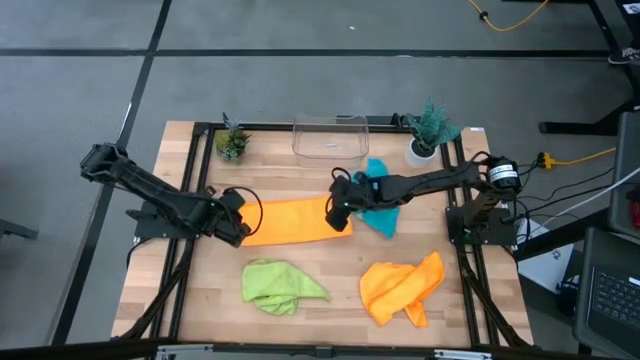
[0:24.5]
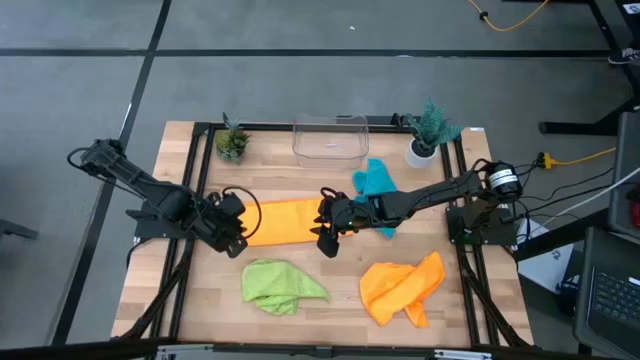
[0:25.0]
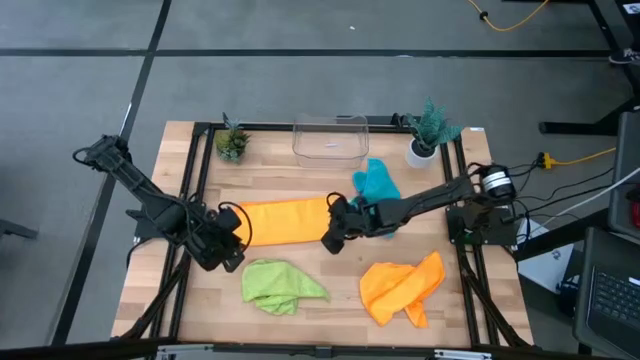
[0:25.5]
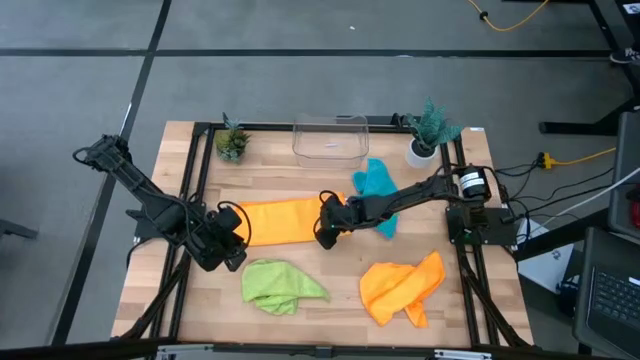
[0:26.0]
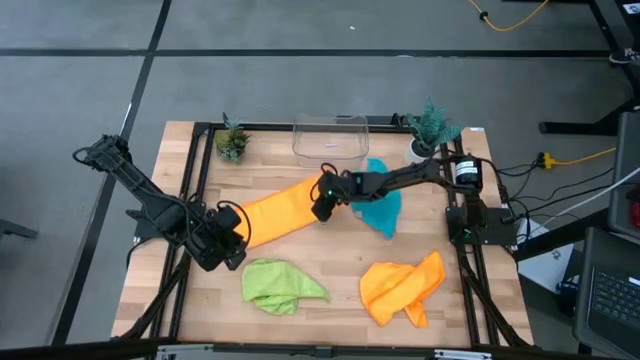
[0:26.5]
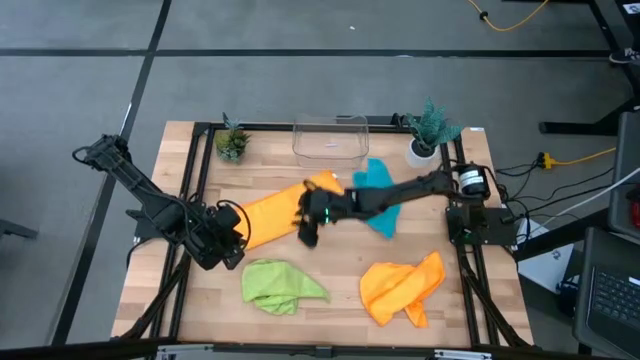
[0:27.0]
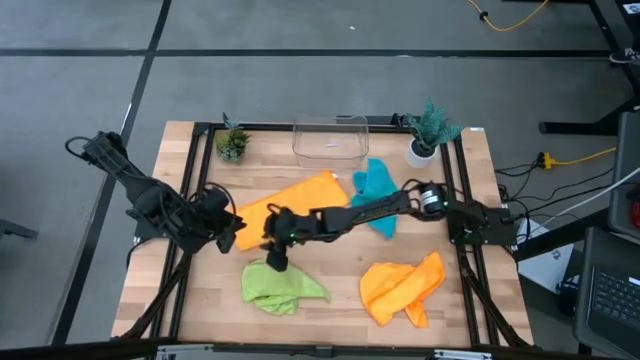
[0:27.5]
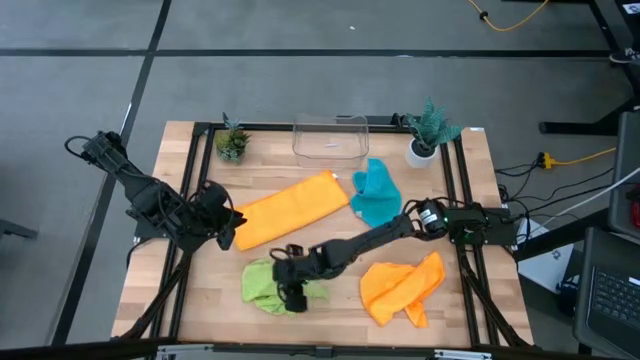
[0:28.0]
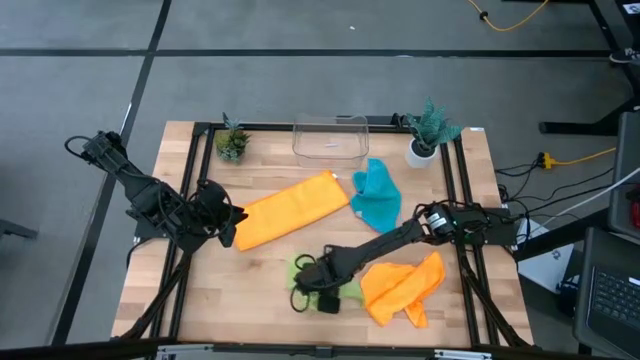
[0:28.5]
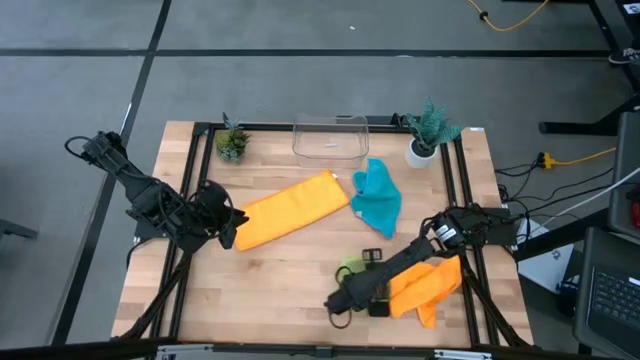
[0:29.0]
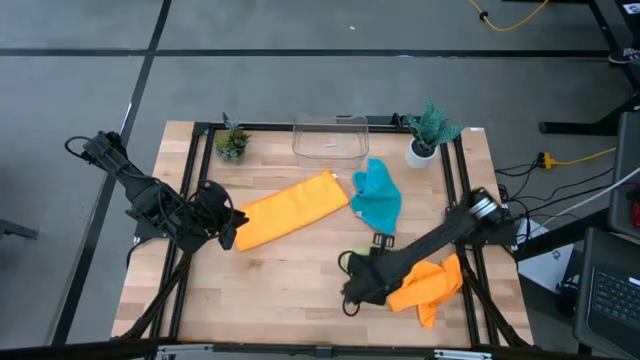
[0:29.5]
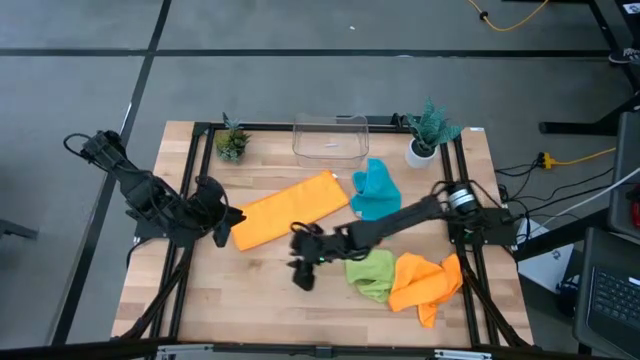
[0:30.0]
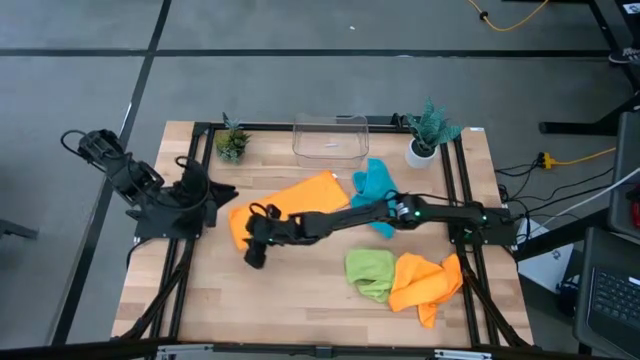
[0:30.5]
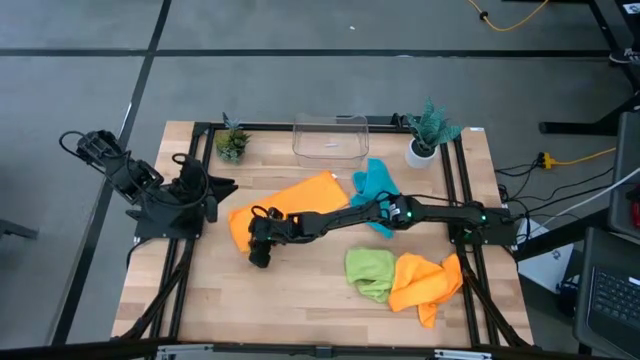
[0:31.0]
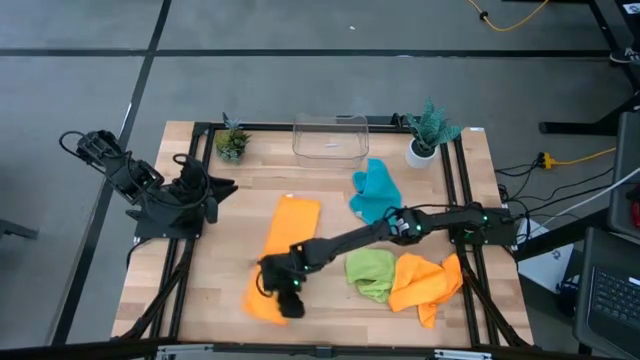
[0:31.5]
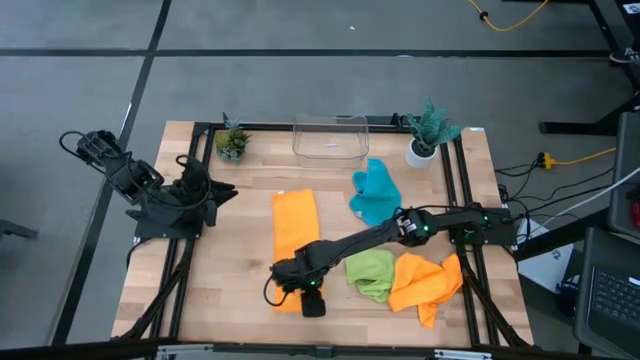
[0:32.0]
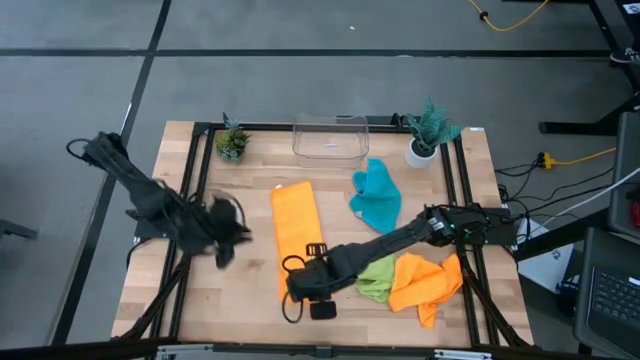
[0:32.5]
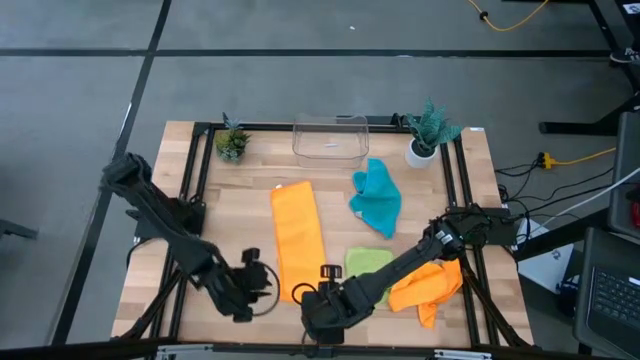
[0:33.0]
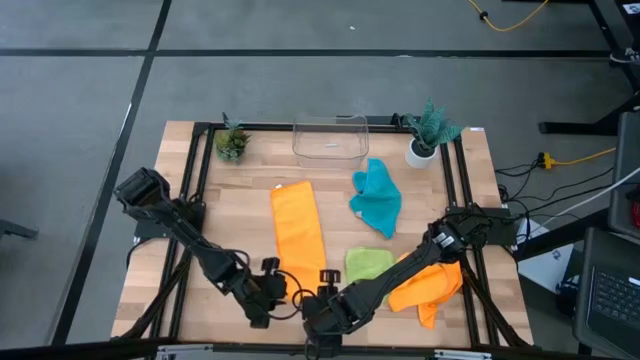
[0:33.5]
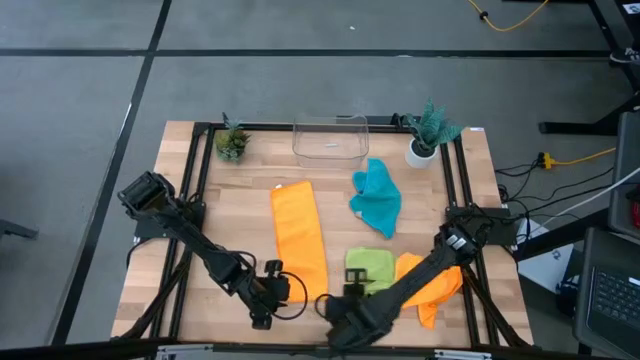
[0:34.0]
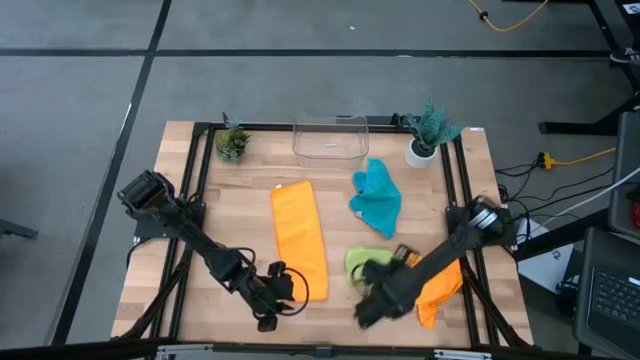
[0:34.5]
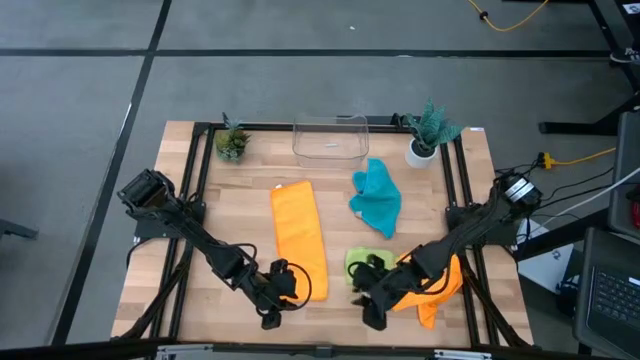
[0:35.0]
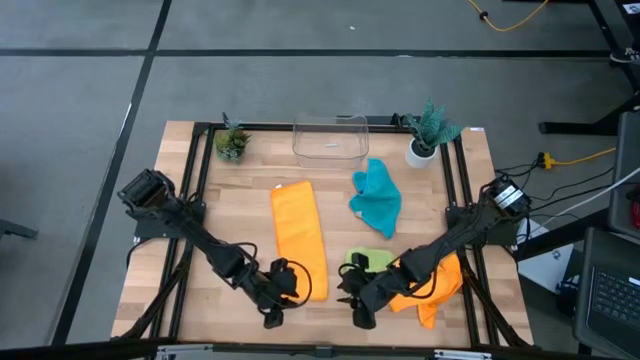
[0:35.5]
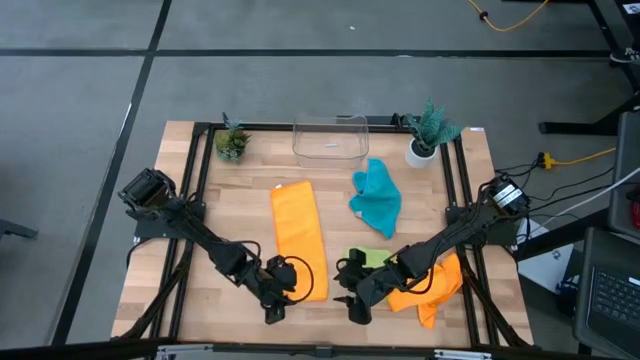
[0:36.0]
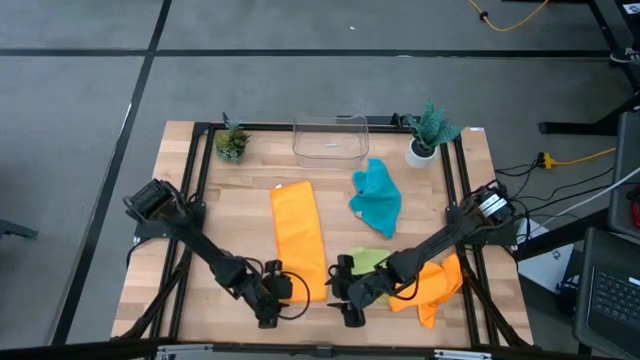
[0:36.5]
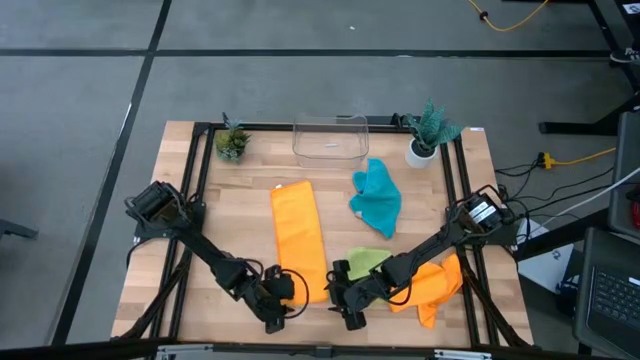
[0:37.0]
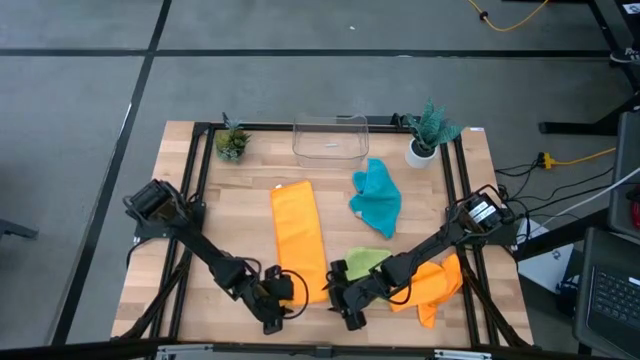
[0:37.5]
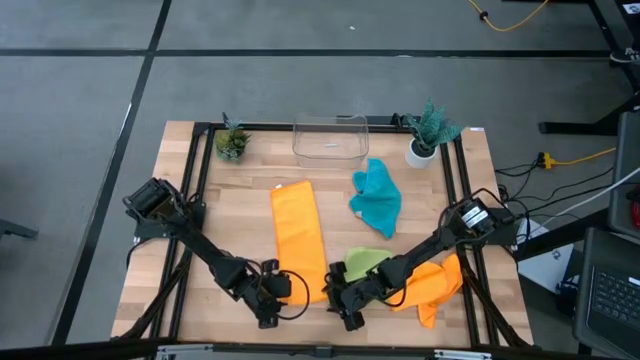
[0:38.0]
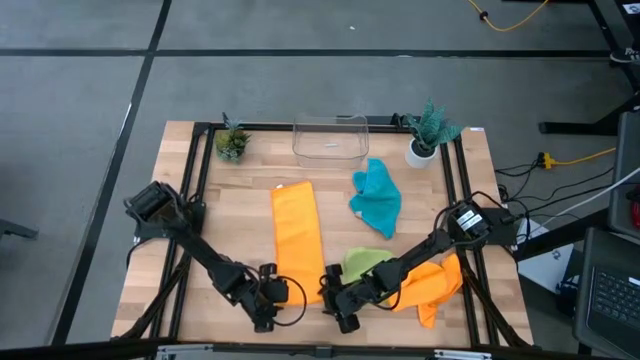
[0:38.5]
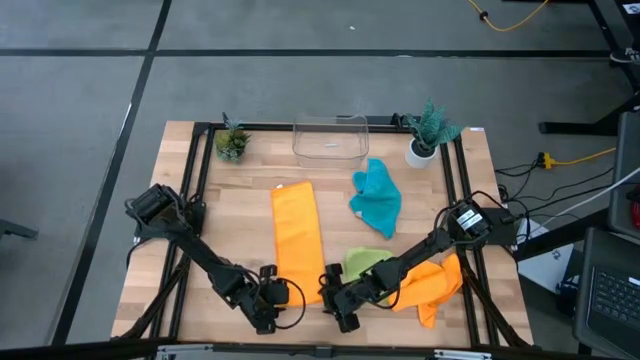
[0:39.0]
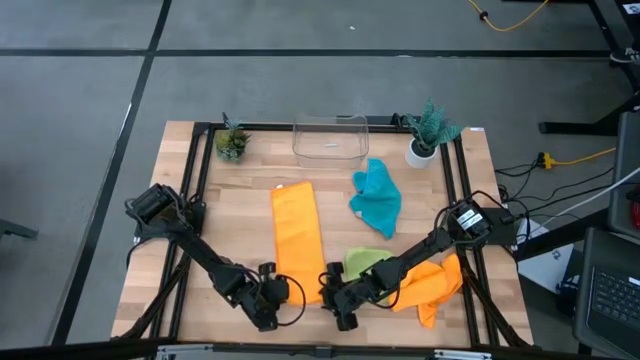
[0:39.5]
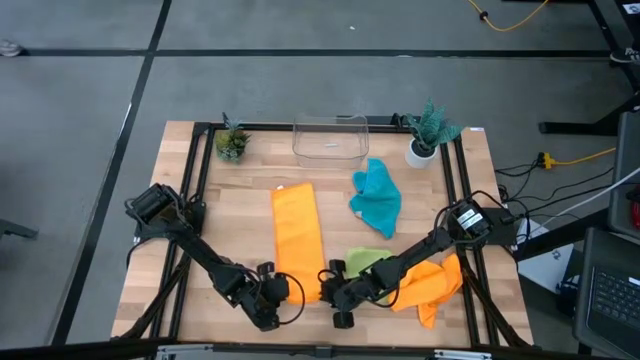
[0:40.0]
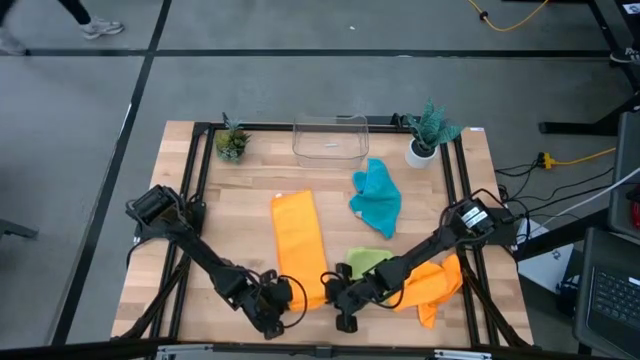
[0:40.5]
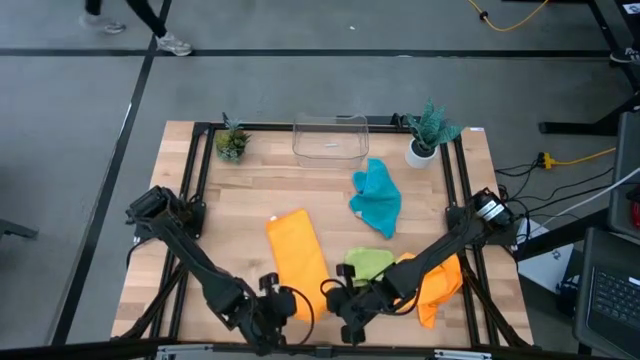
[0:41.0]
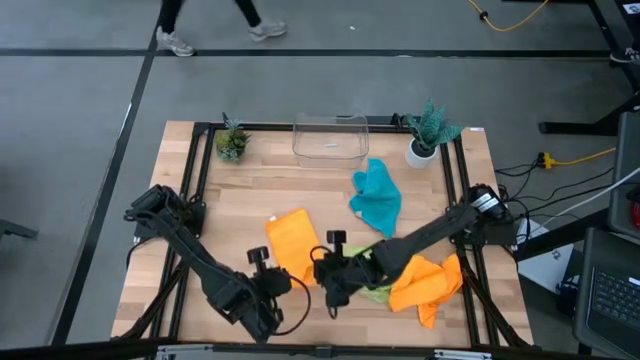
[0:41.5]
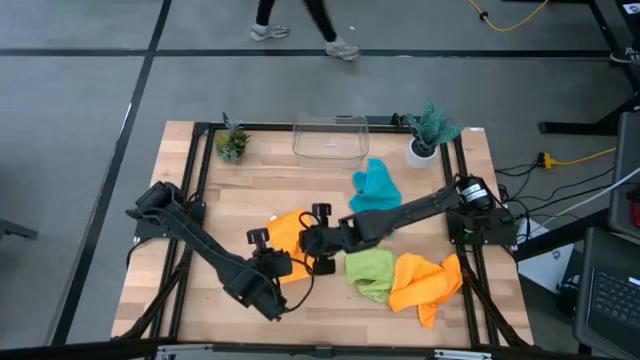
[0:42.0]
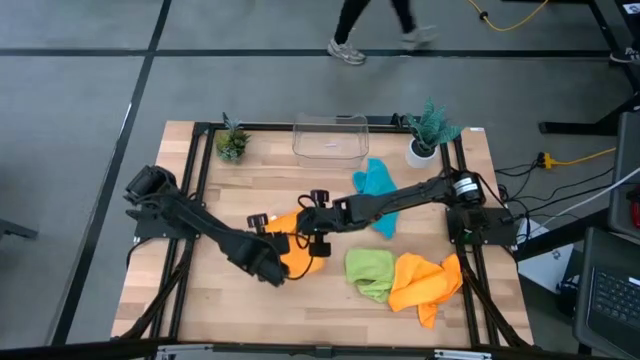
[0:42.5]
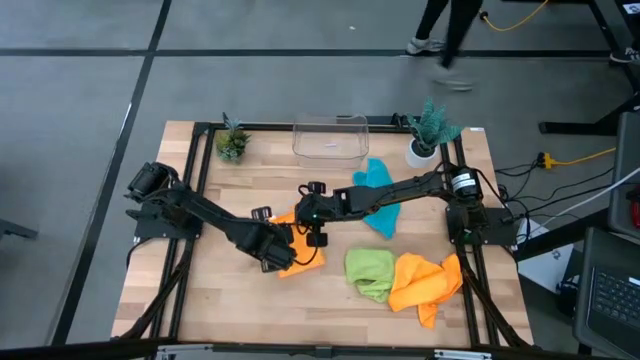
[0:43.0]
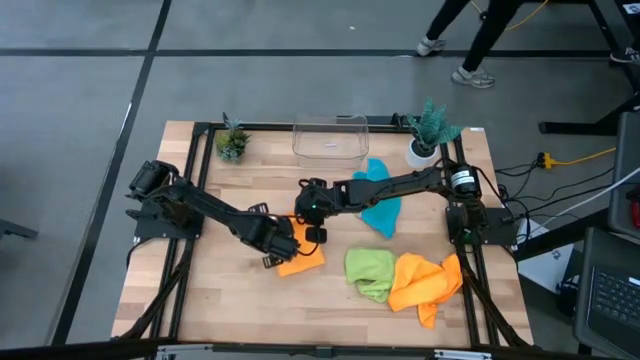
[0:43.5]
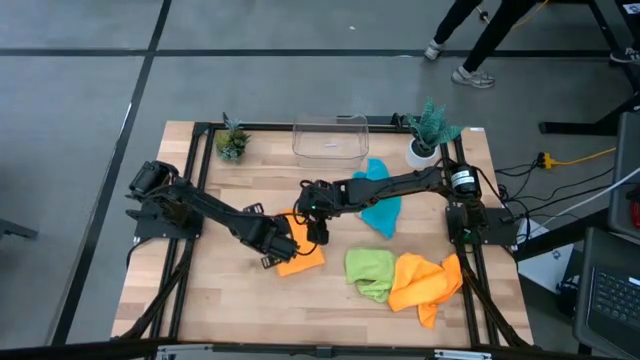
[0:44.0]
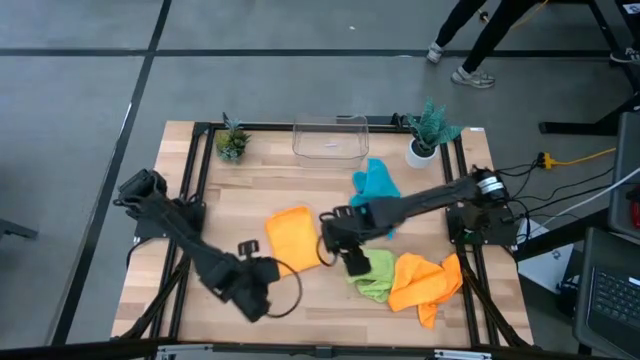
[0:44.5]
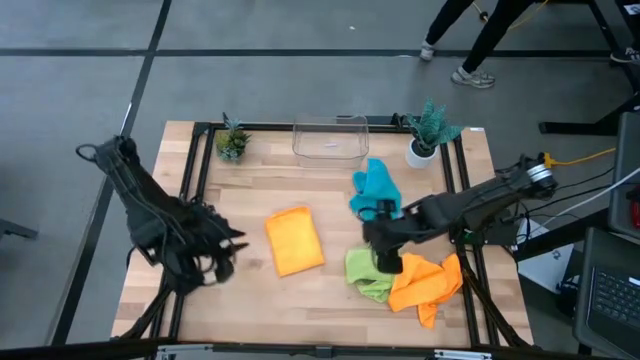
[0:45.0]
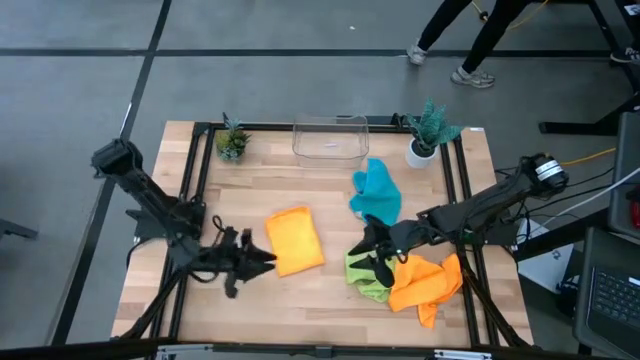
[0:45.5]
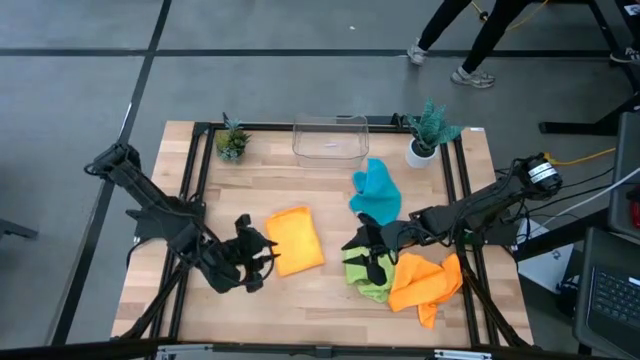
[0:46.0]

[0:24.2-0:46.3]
Task: Fold microfiber towels
Fold the orange towel
